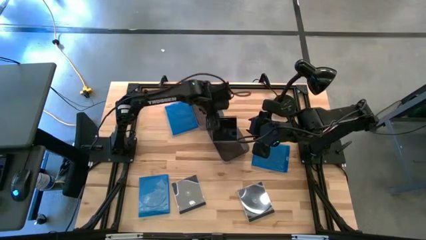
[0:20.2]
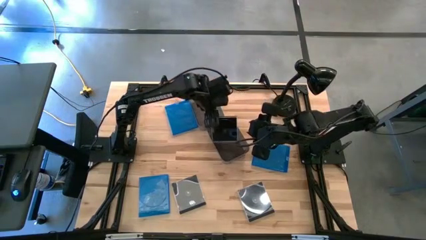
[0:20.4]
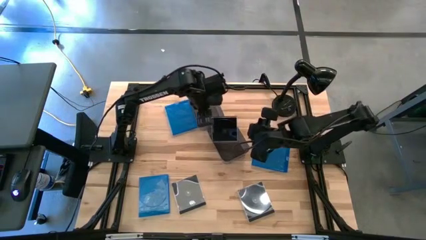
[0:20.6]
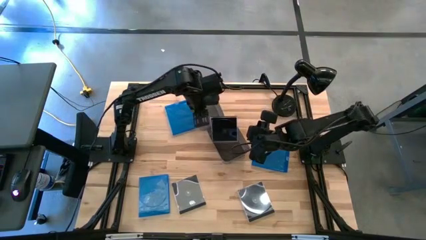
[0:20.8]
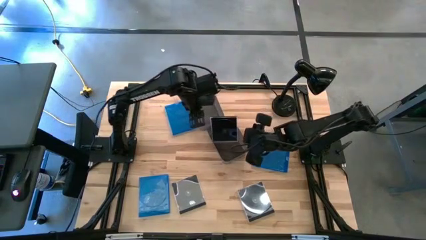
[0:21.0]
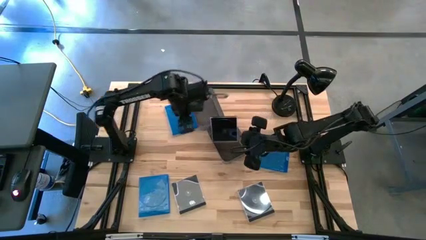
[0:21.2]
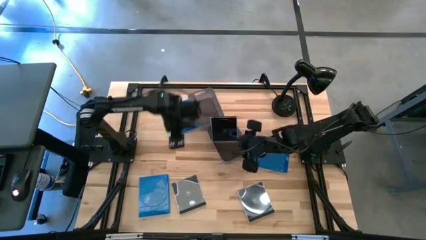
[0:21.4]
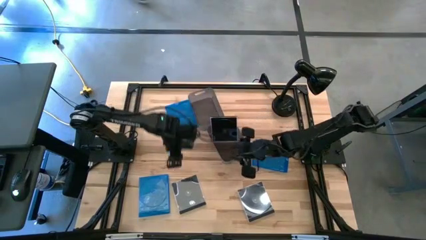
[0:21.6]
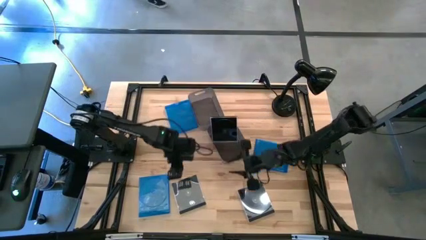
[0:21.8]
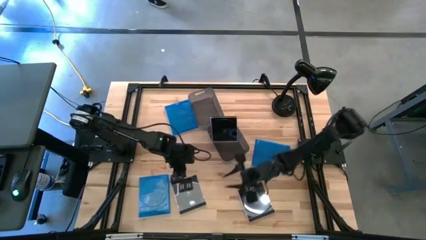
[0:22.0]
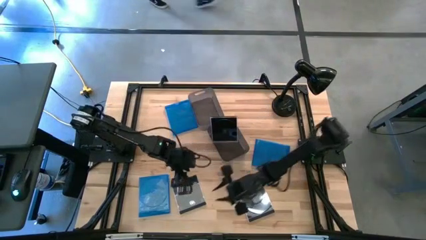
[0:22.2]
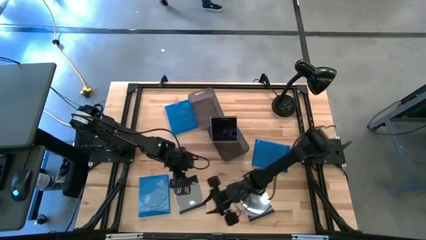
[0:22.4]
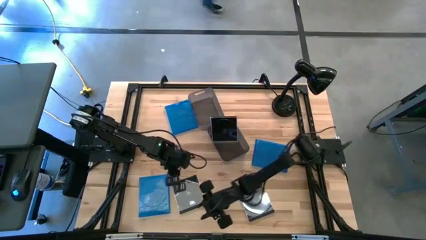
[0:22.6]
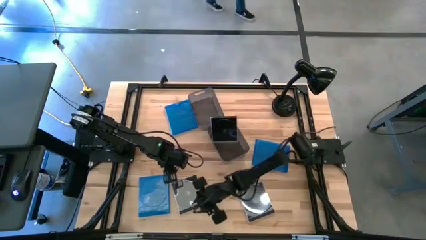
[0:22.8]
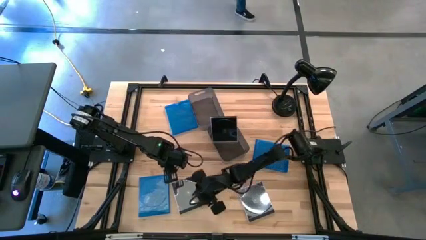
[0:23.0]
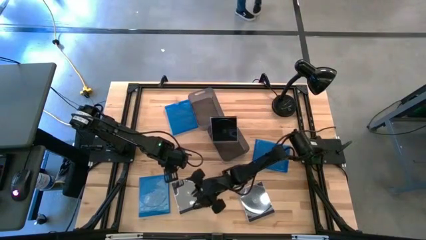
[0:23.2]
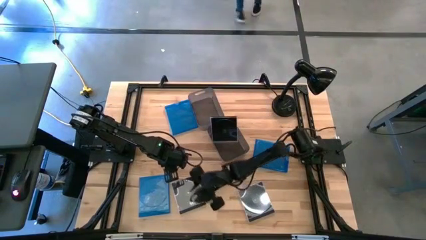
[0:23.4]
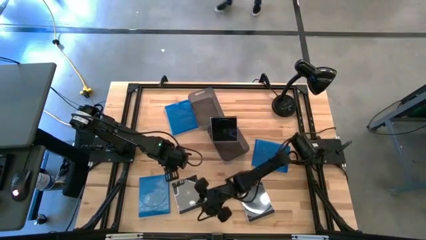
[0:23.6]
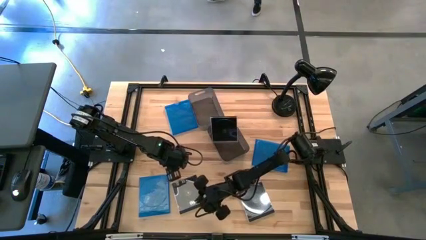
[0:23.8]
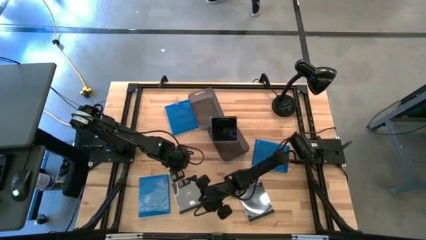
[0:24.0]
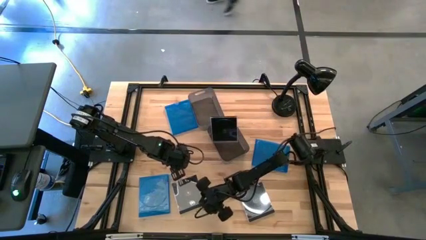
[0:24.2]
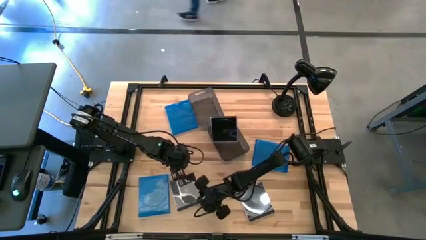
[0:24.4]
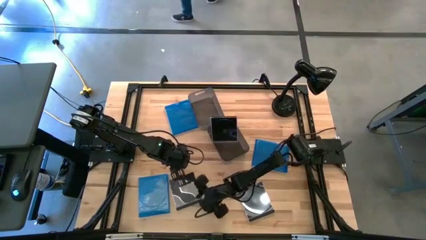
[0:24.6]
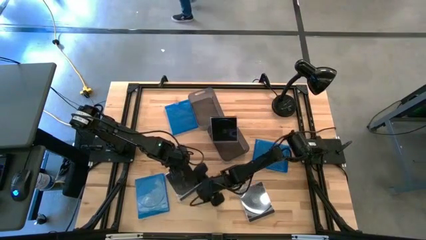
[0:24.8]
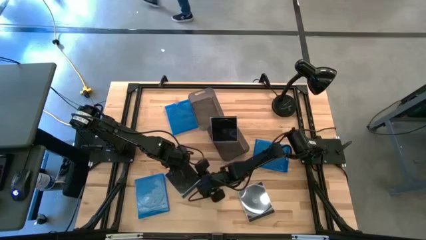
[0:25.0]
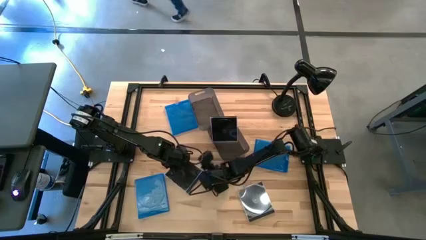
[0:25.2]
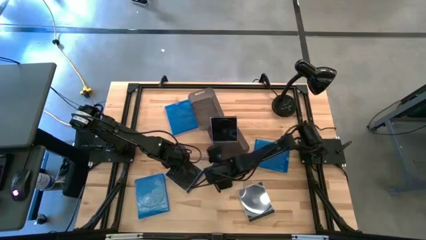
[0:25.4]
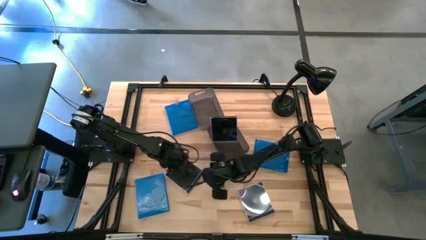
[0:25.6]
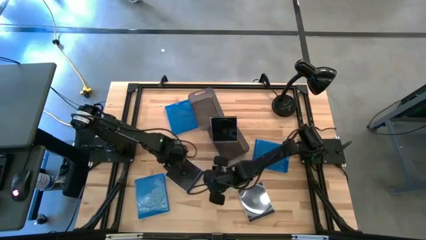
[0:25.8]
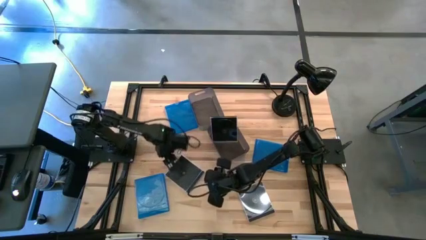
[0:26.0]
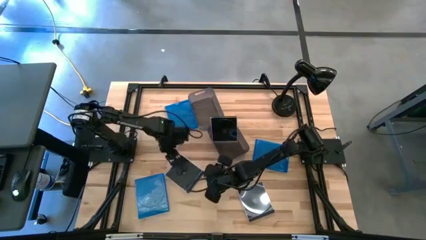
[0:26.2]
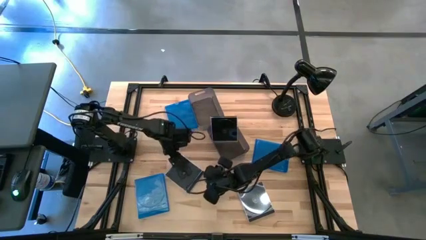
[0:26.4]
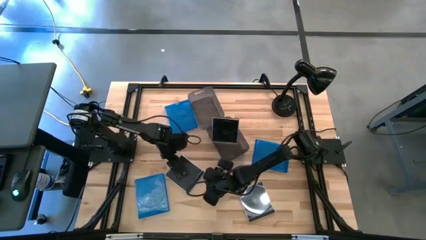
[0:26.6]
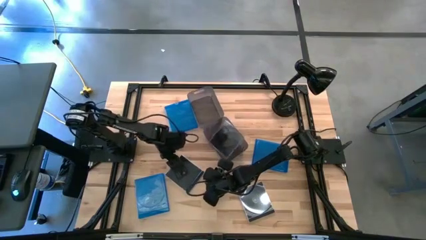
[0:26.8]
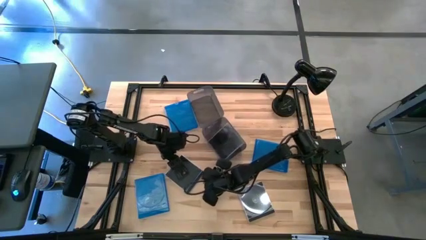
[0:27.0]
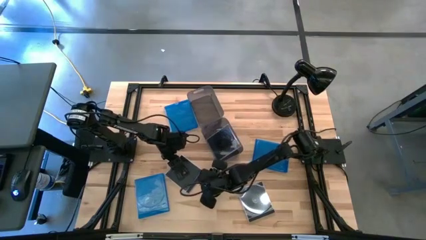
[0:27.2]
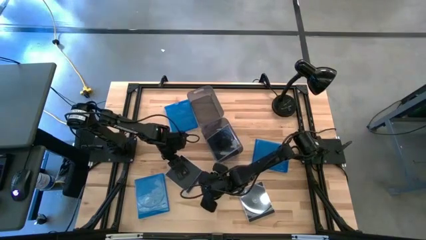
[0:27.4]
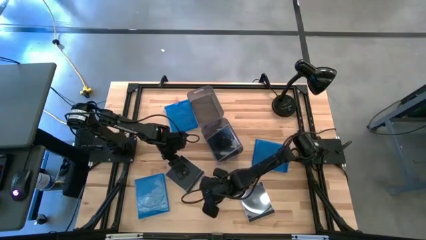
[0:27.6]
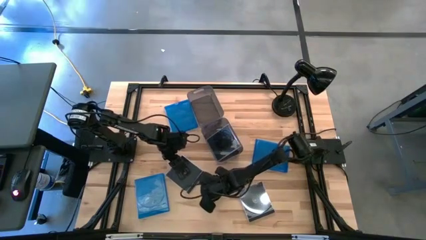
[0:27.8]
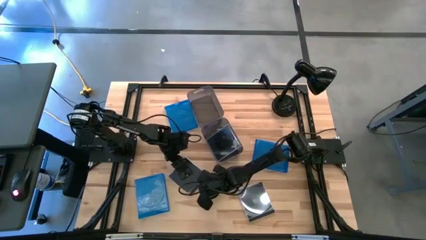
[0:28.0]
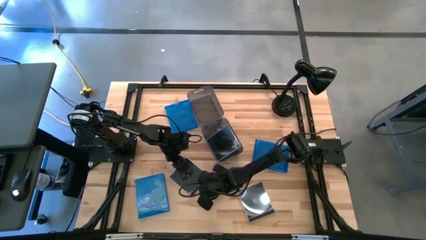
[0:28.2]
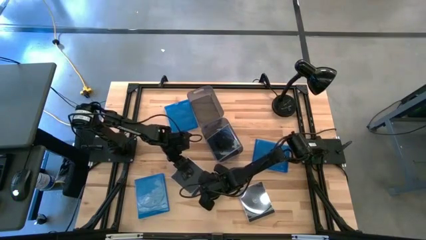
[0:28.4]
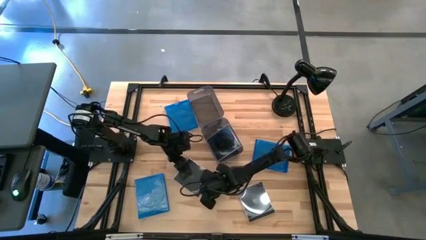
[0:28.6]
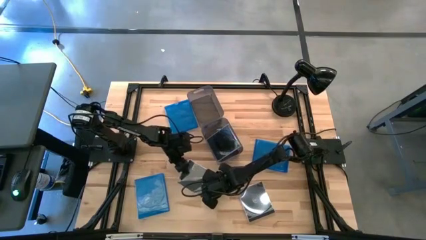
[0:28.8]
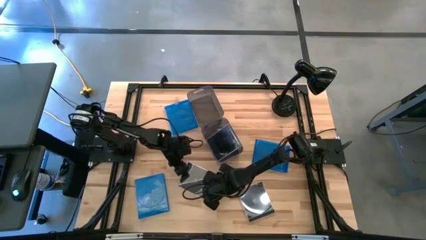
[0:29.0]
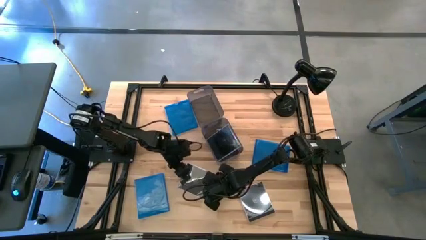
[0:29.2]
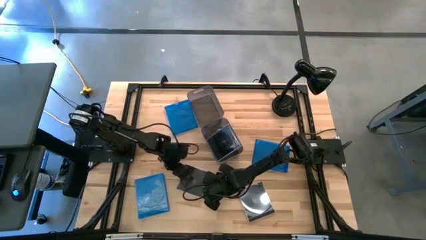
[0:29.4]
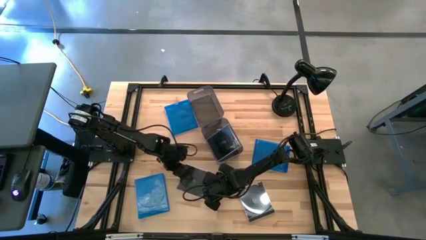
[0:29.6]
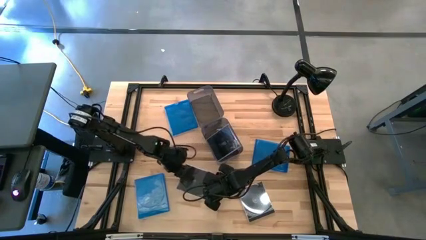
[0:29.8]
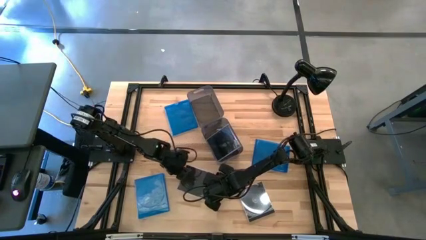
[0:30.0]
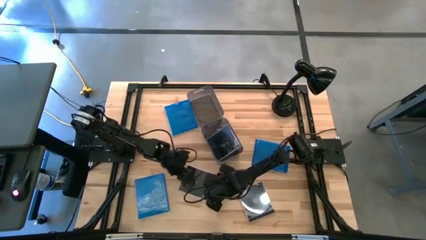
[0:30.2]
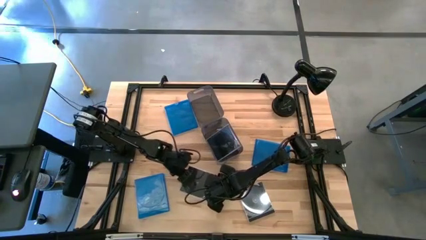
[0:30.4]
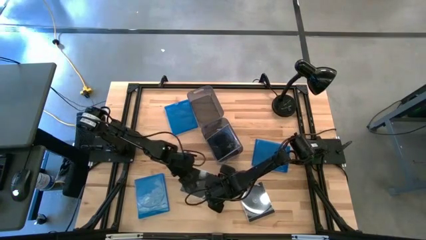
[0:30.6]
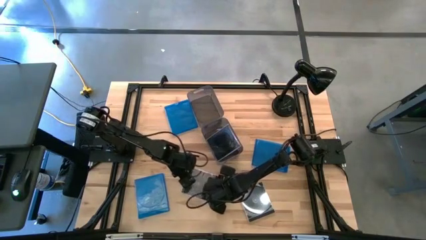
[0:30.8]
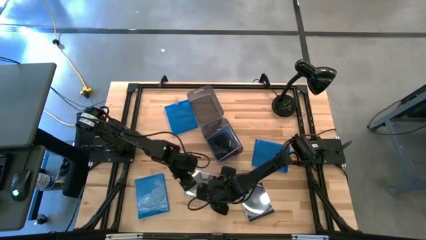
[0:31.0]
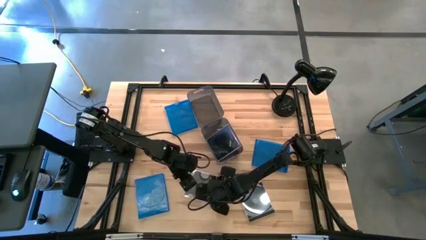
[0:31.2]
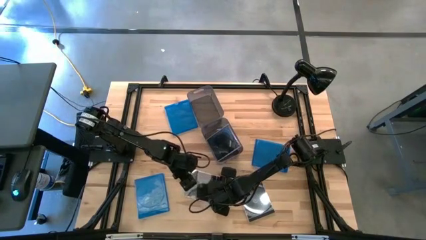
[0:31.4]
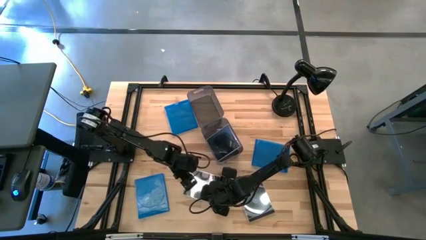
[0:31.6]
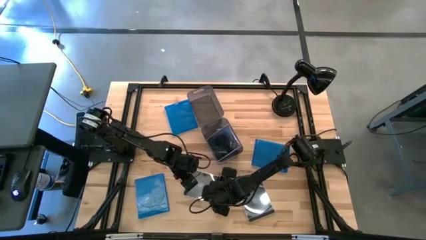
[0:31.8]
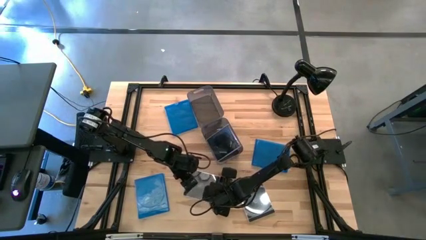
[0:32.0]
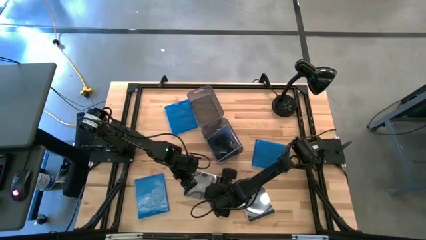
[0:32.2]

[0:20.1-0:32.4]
Task: Pick & place jewel cases by type
Put the left black CD case into the bottom black bin
